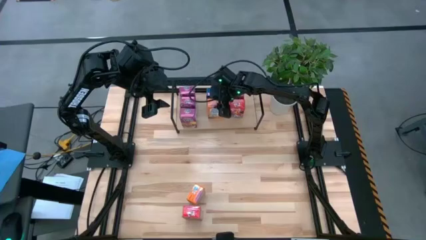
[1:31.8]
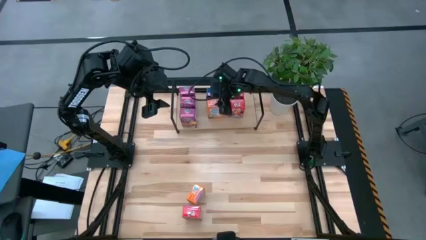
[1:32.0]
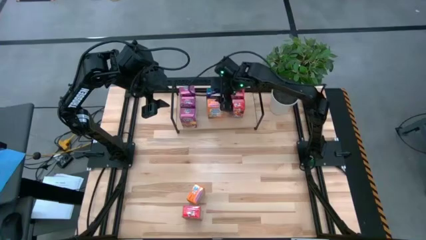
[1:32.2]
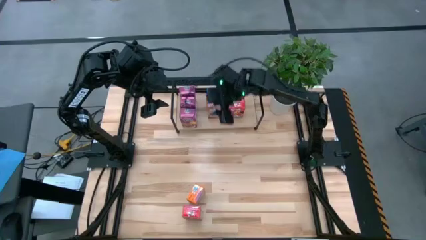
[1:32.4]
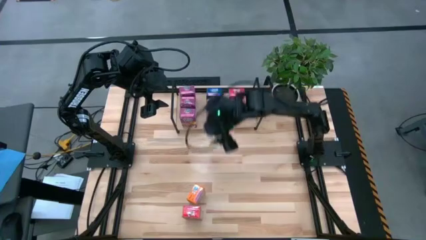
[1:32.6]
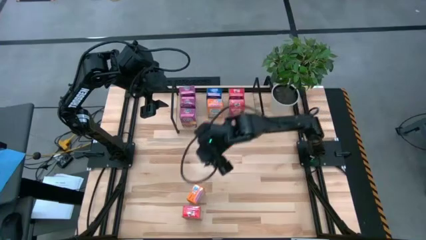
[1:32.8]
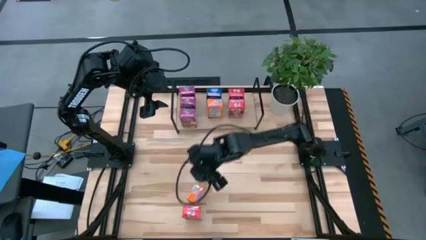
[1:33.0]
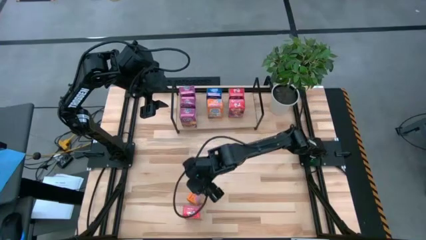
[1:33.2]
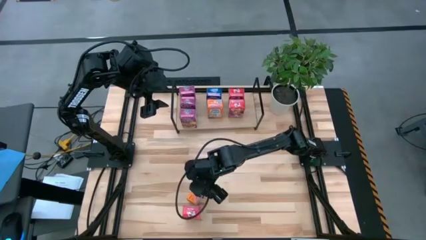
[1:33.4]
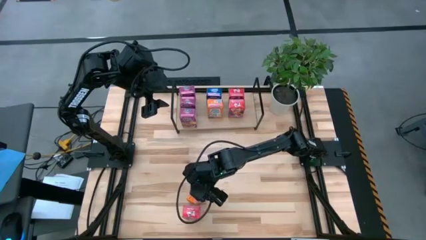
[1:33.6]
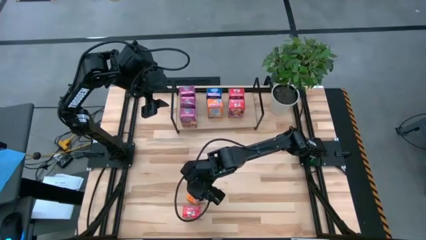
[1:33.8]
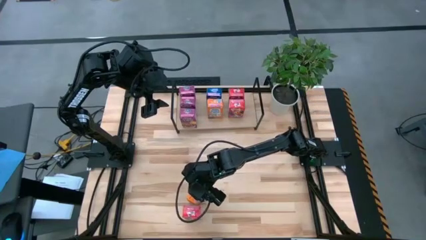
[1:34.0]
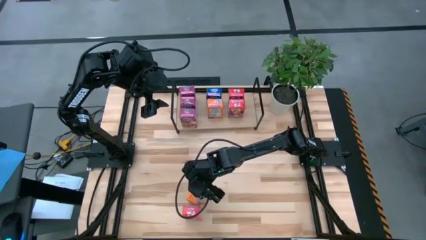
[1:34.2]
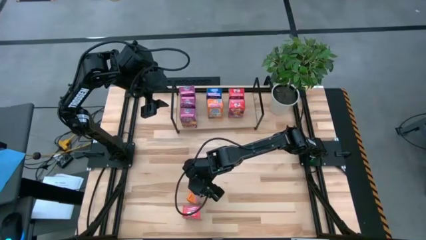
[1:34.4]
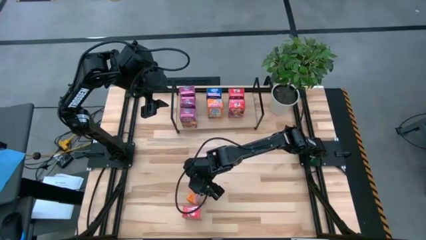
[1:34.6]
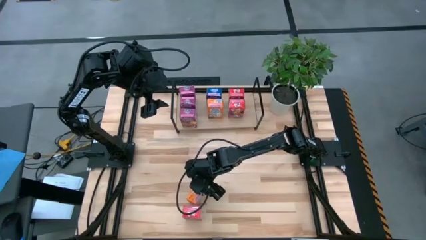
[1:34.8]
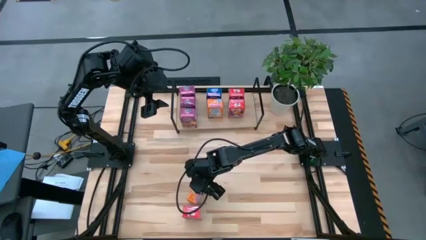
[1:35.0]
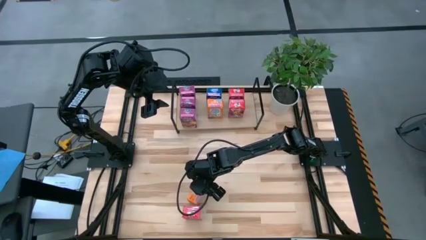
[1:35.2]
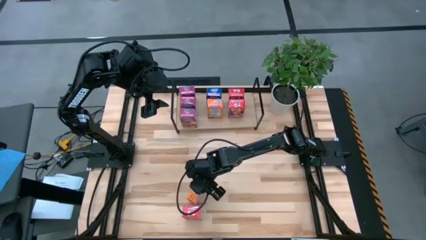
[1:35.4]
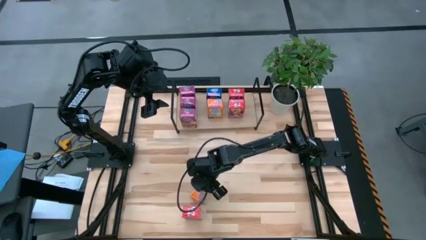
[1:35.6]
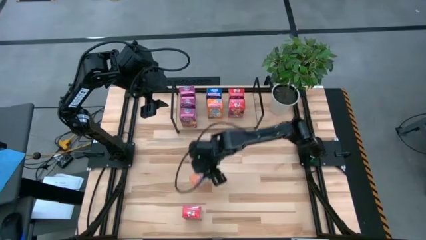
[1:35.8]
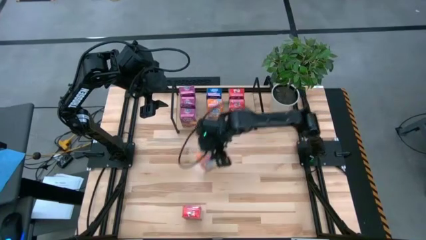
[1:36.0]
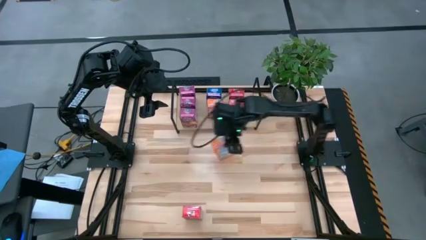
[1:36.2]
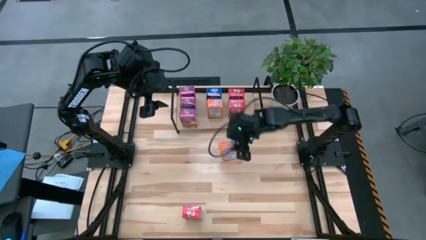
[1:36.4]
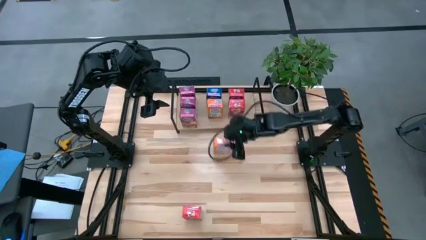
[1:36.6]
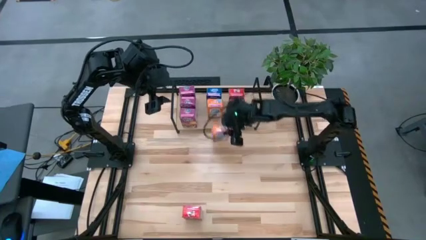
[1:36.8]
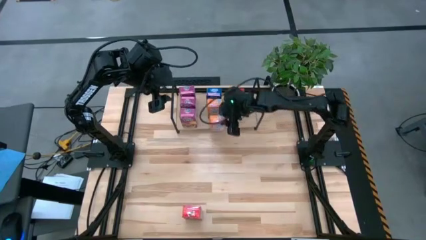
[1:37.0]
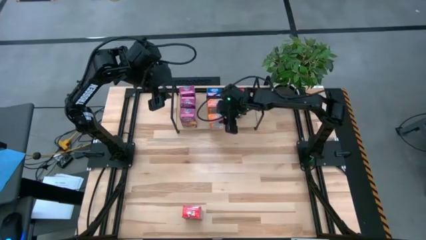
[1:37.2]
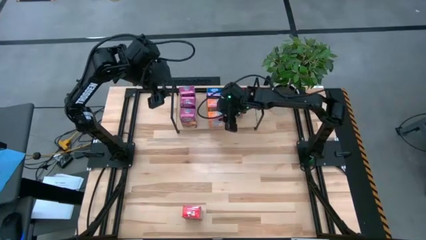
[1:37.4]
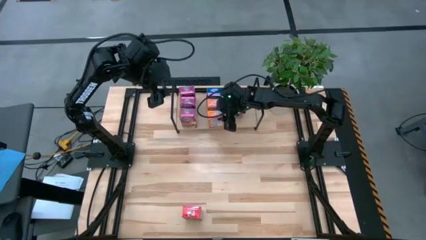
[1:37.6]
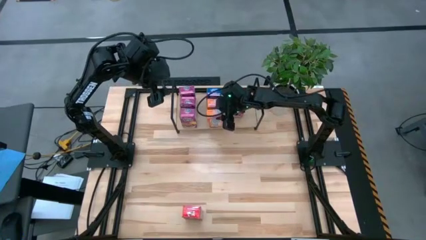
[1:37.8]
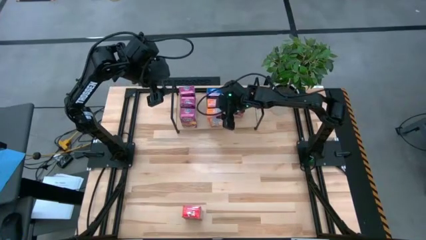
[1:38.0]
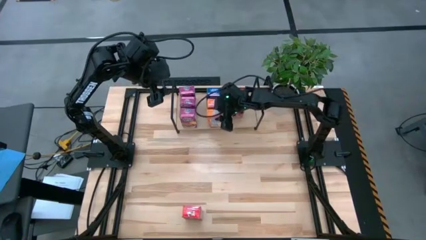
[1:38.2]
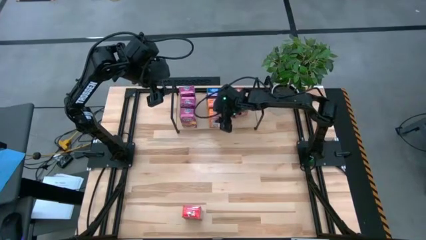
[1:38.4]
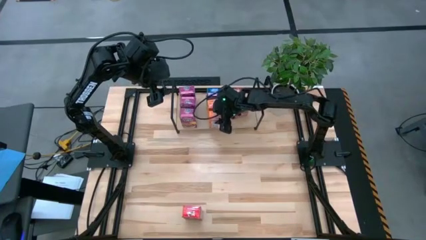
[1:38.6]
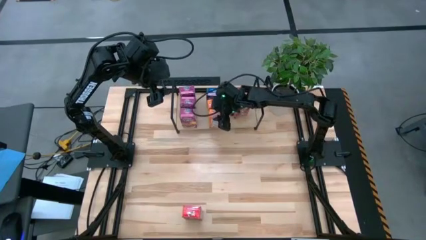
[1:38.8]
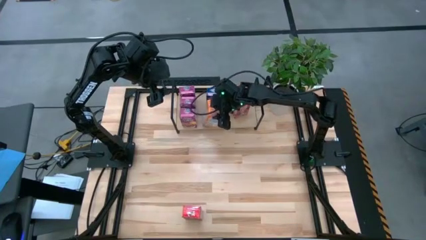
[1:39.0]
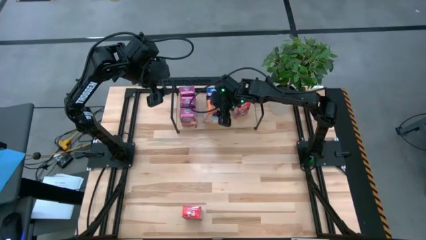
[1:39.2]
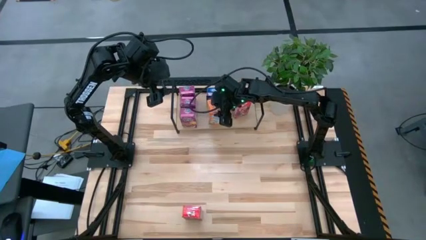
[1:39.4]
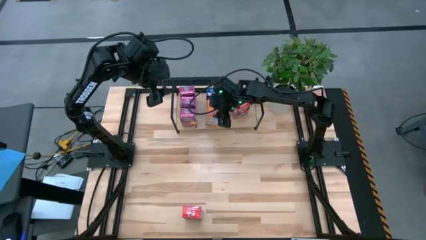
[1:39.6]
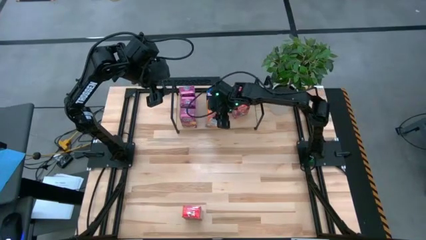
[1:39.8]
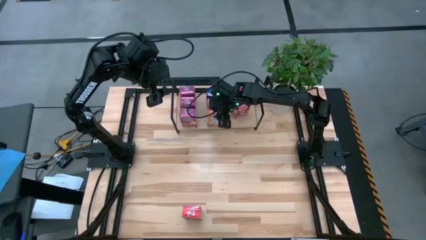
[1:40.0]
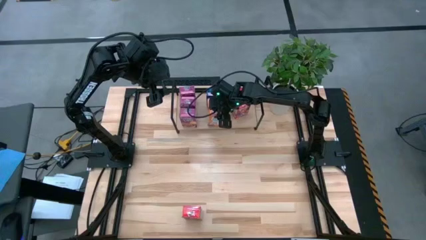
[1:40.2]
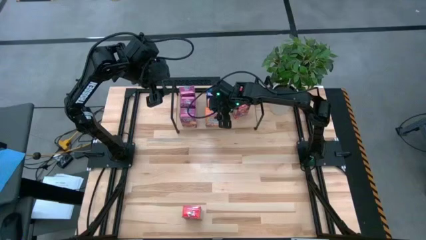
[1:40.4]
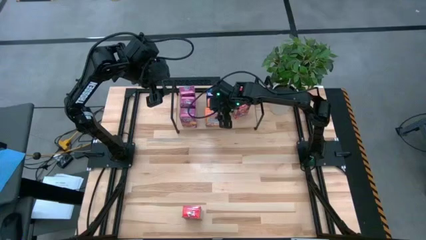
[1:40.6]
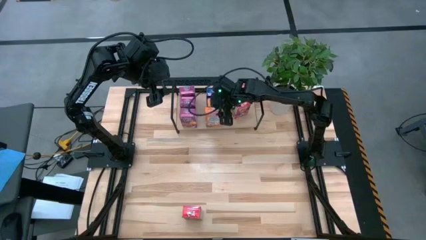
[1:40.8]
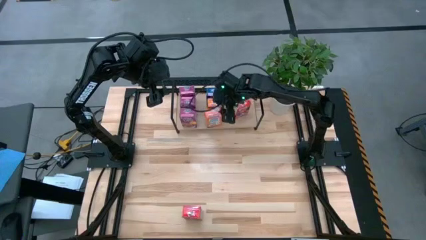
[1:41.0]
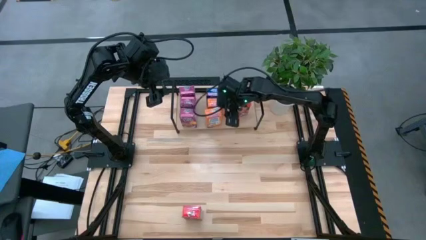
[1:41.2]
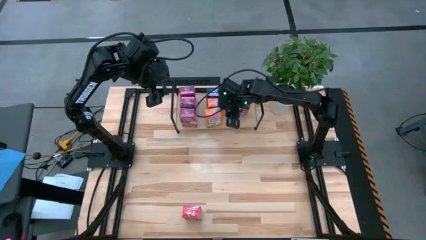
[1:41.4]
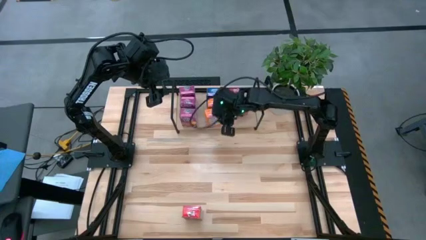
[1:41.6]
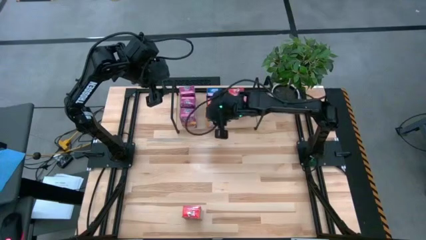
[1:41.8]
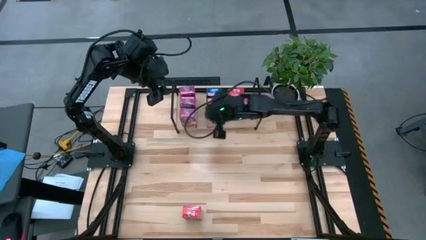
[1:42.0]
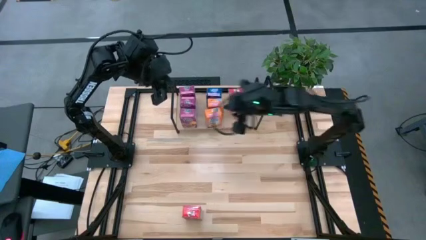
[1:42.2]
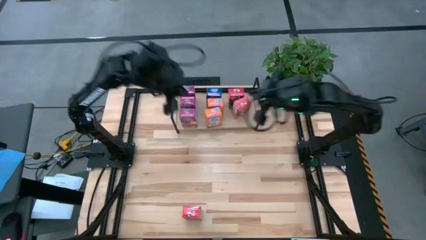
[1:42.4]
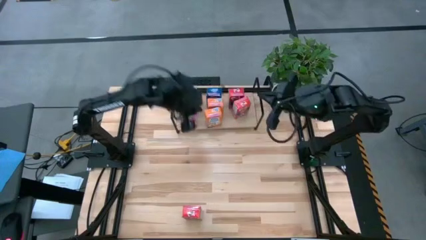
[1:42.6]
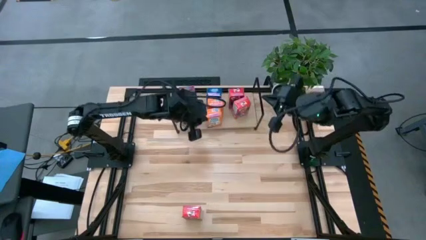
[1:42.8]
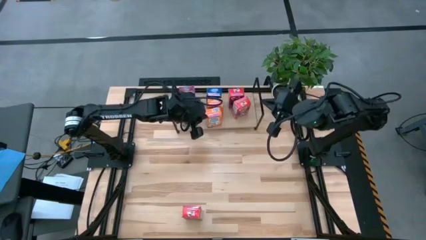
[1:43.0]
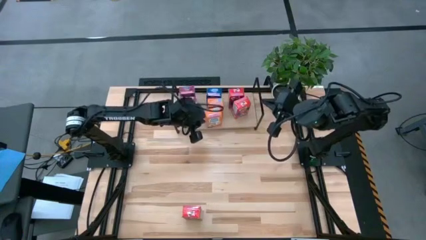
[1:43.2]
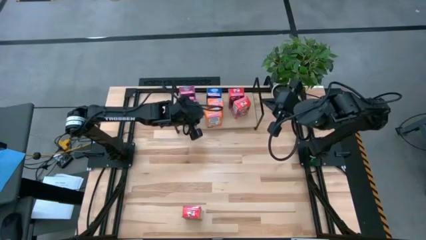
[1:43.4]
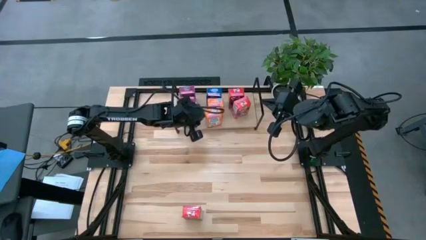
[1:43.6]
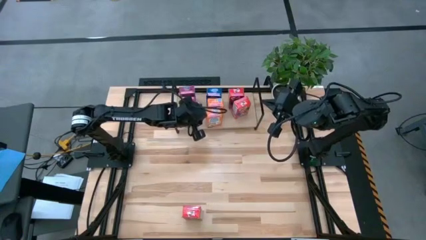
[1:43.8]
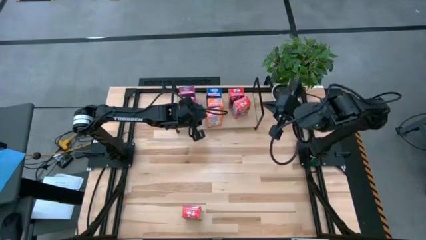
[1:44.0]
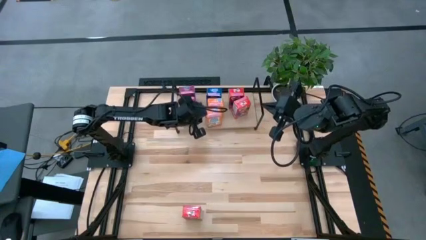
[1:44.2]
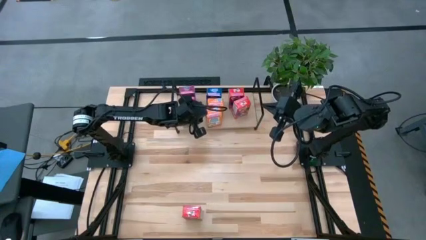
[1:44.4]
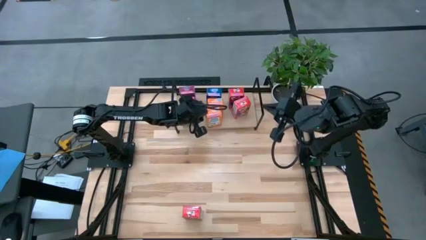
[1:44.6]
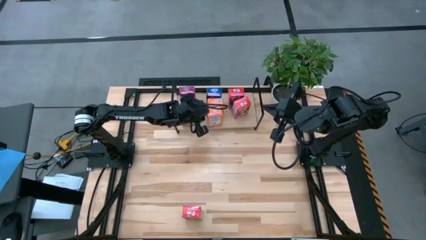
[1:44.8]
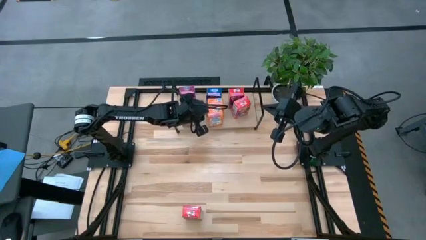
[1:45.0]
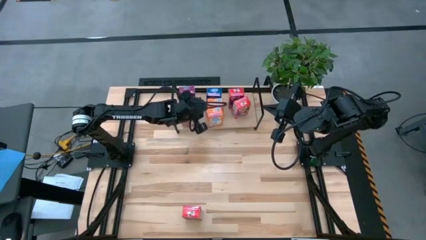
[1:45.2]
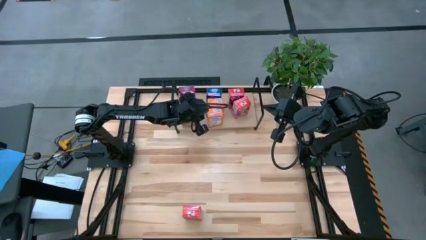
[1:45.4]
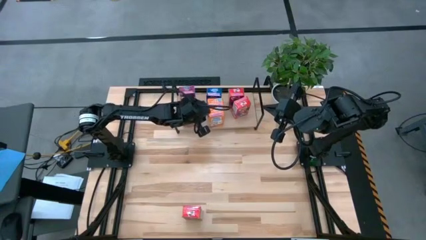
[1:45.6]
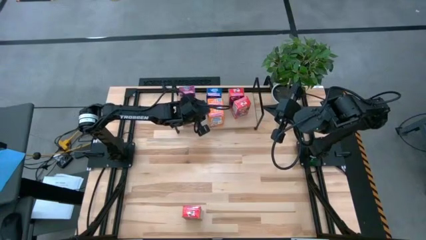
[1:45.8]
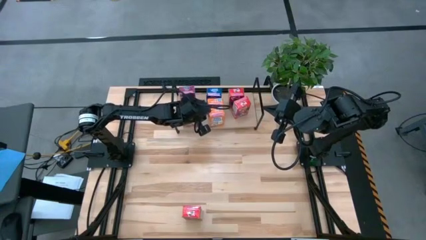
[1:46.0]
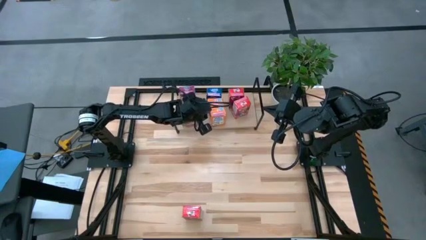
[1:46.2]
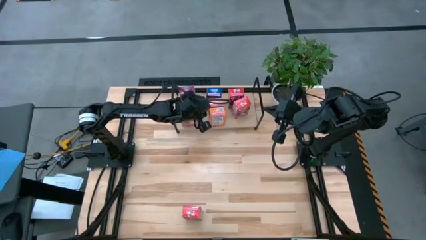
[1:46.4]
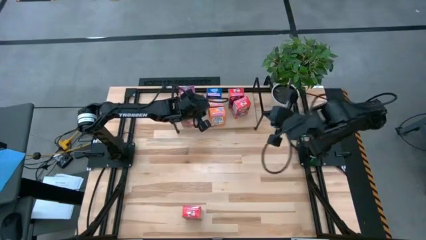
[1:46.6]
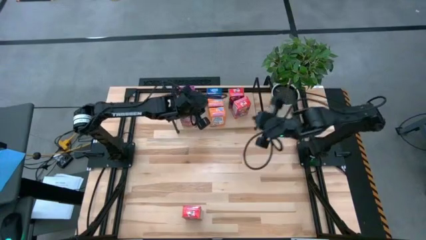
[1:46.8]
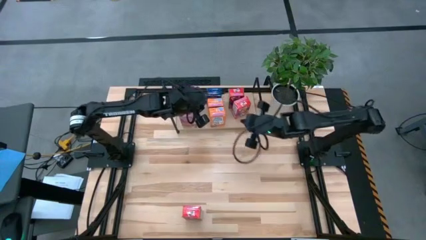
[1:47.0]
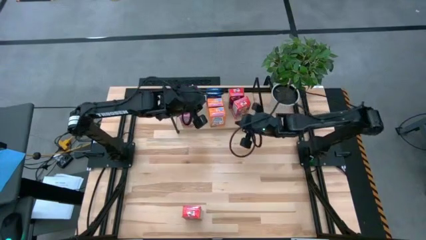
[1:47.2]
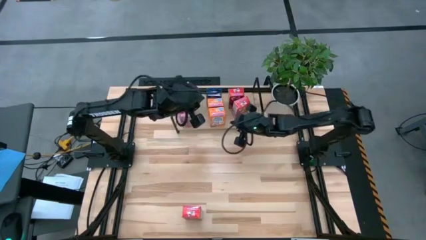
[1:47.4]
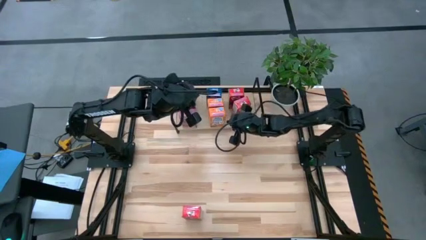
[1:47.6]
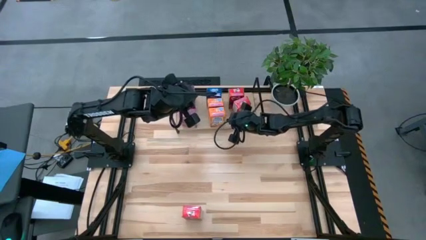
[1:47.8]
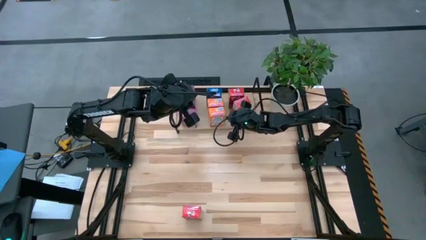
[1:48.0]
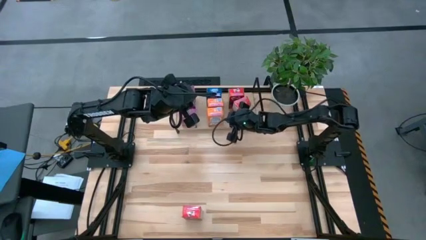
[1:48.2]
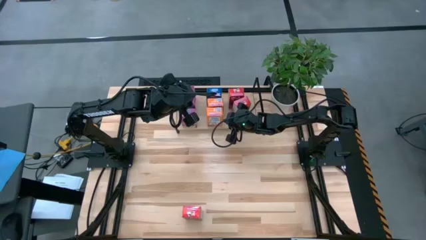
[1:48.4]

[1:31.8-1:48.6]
Task: Stack cereal on shelf
Put the orange cereal box on the shelf aligned with the other orange cereal box
